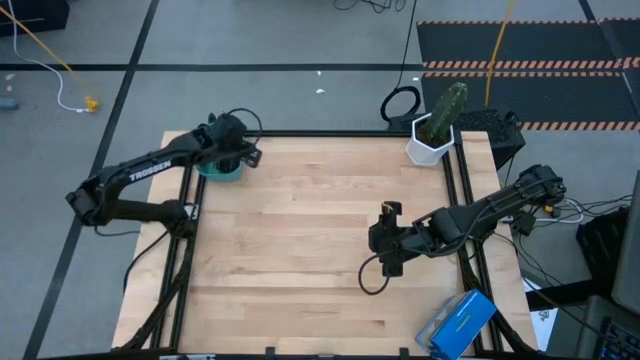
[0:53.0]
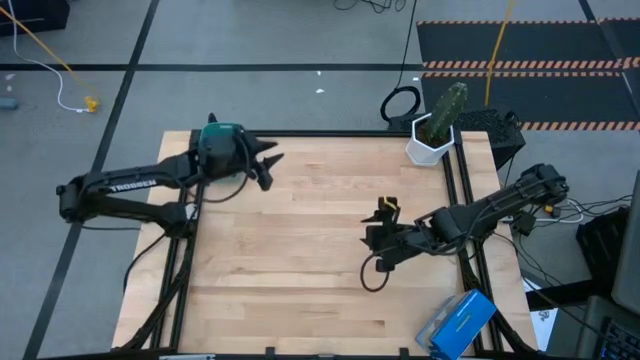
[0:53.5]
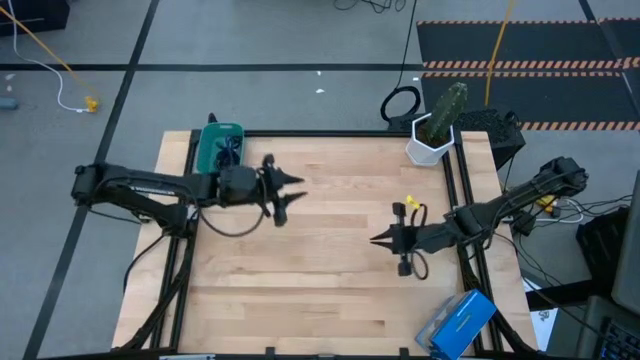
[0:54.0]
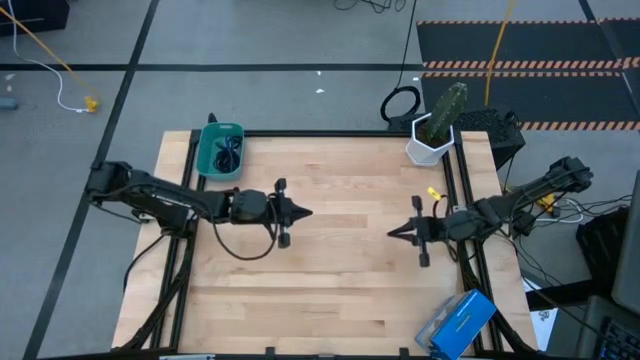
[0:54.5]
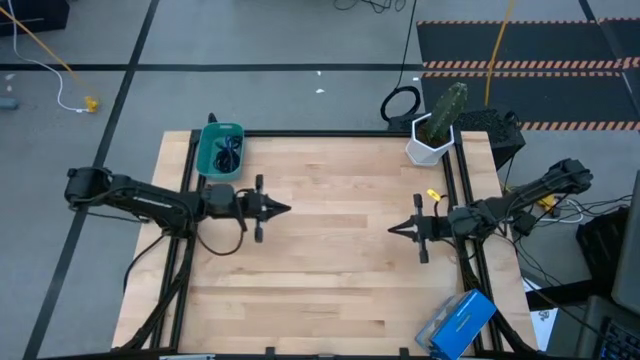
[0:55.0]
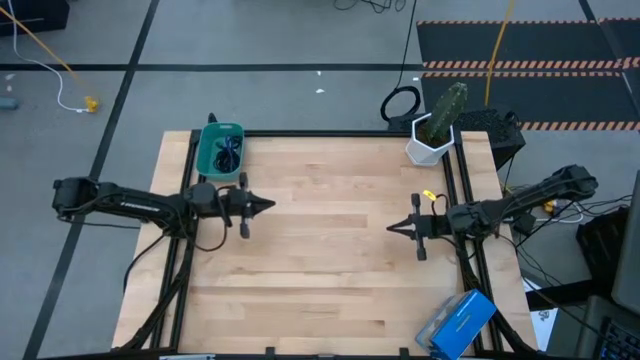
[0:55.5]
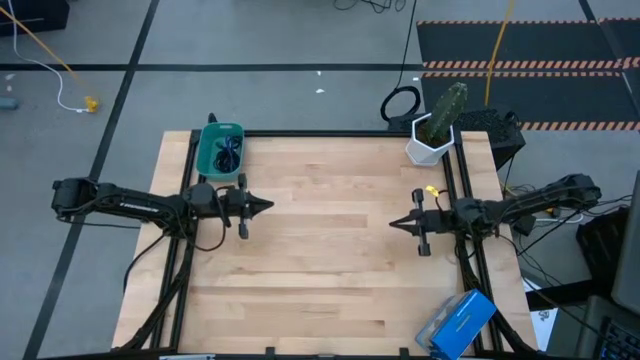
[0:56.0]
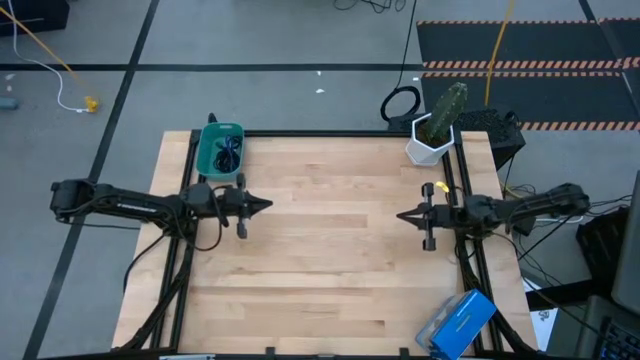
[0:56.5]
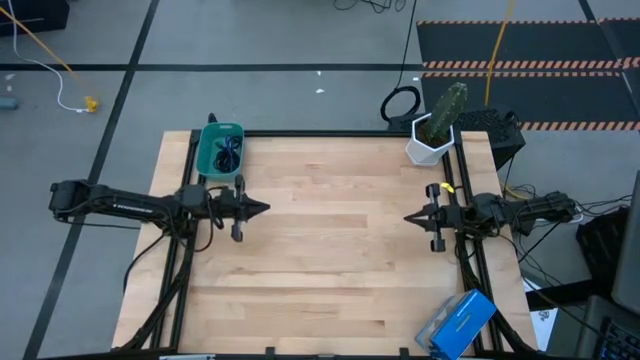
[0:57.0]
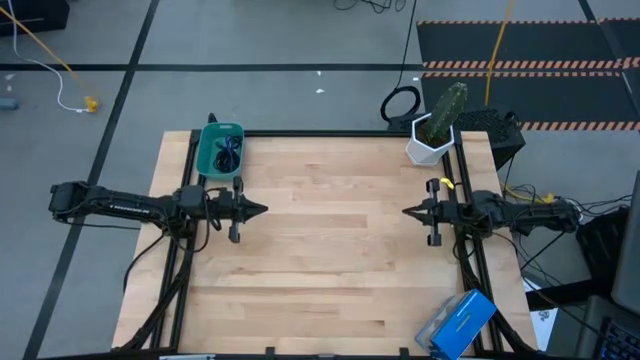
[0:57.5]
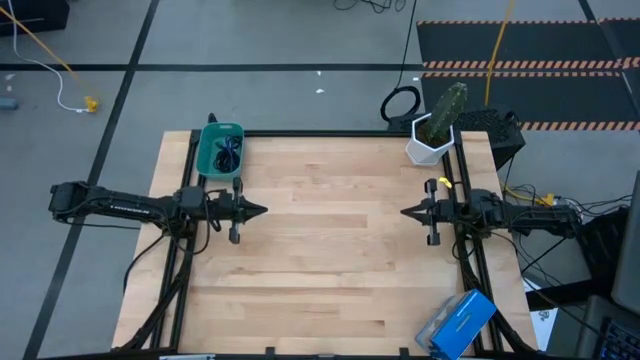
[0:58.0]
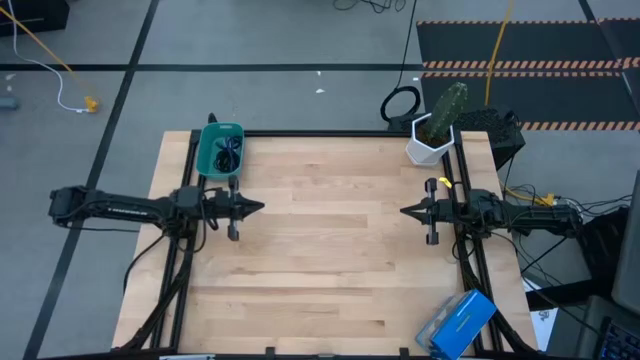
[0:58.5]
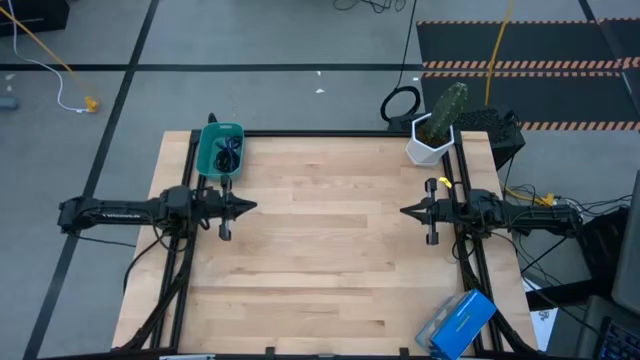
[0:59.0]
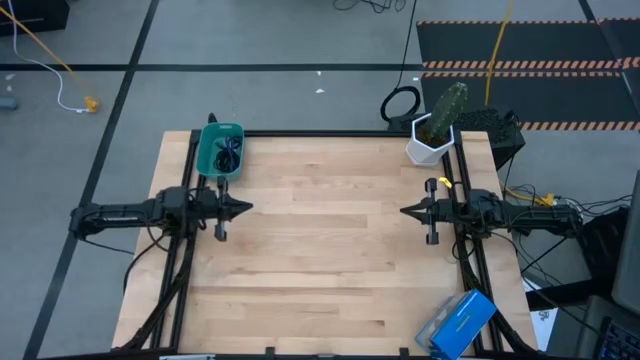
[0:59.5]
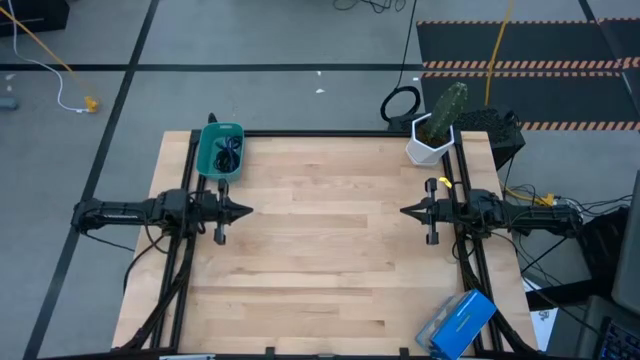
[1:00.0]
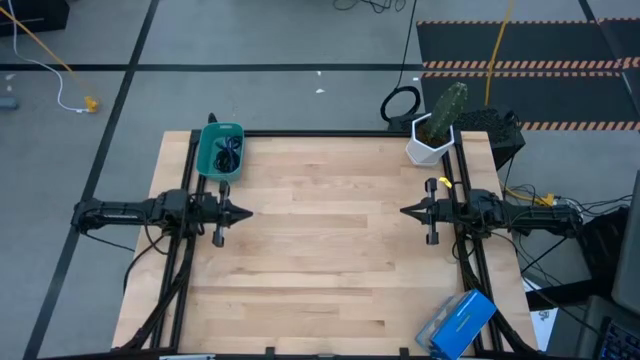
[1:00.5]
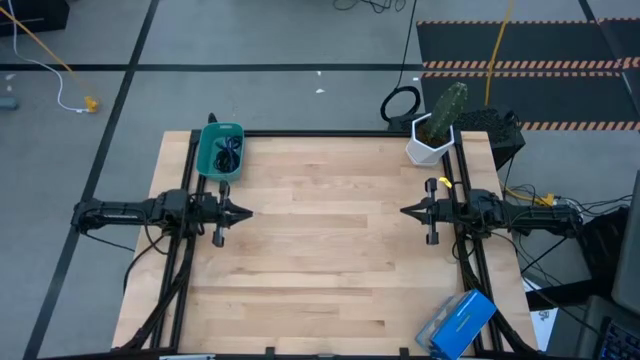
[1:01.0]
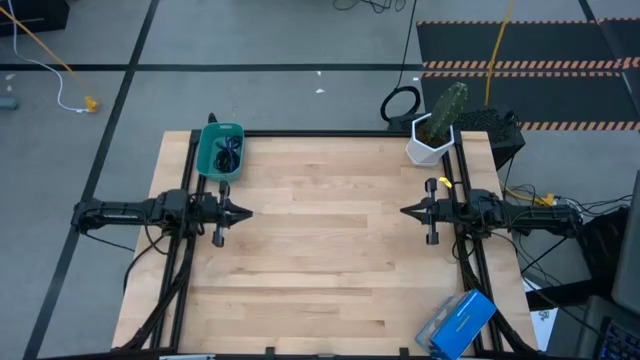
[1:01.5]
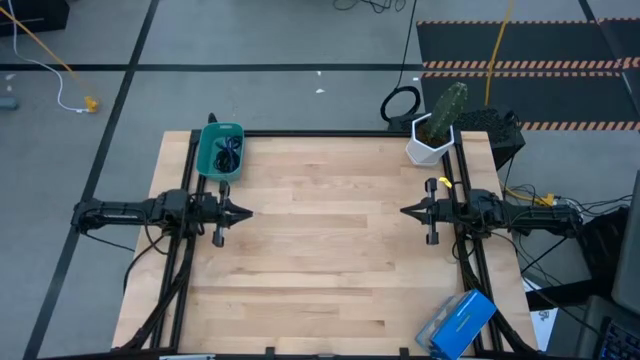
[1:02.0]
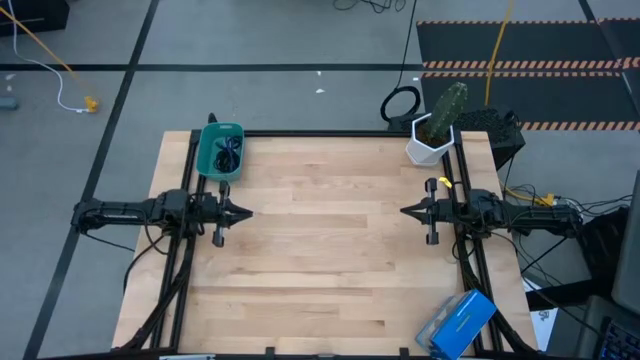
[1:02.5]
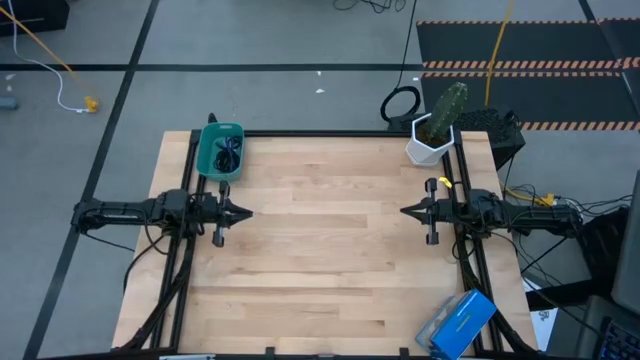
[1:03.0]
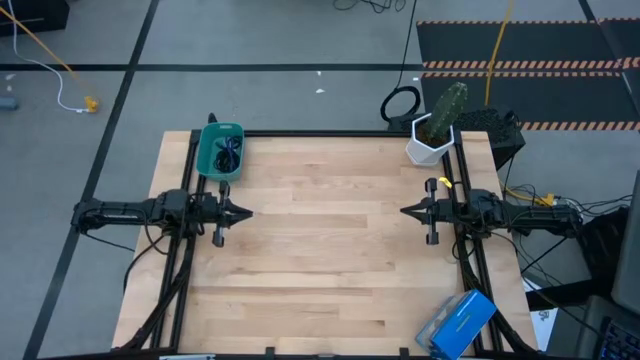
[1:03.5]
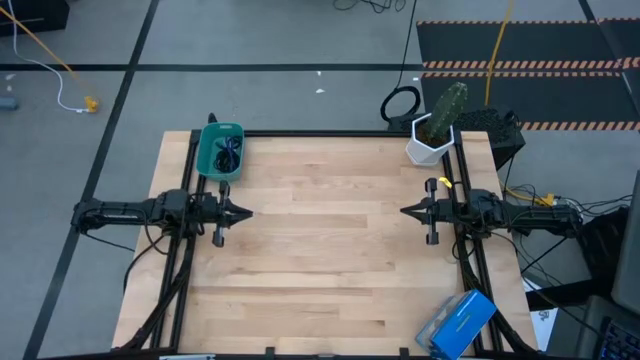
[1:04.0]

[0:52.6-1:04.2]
Task: Pick and place USB-C Cables
Return to Home Position
